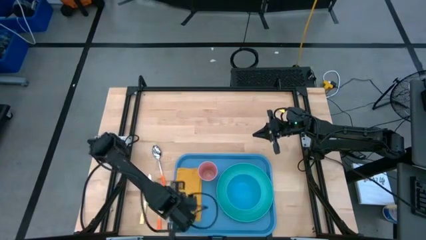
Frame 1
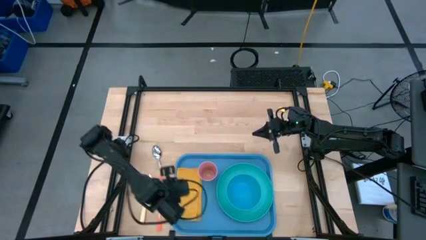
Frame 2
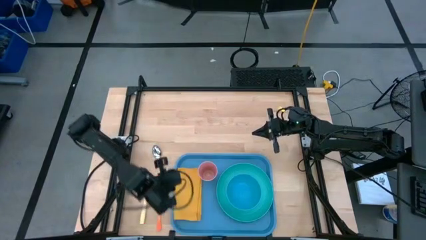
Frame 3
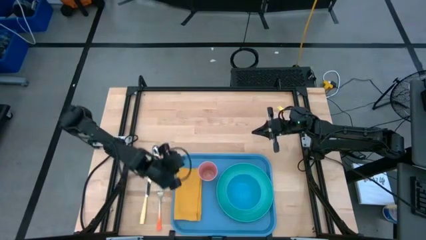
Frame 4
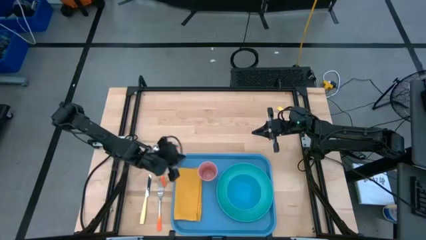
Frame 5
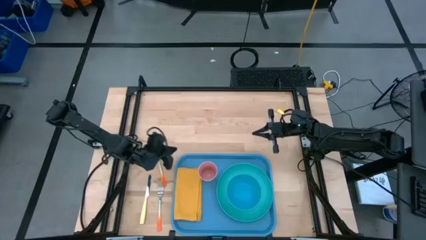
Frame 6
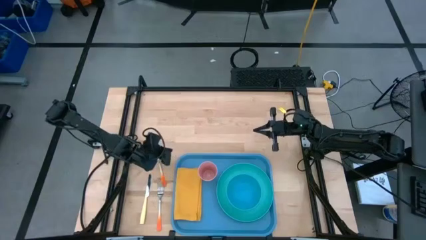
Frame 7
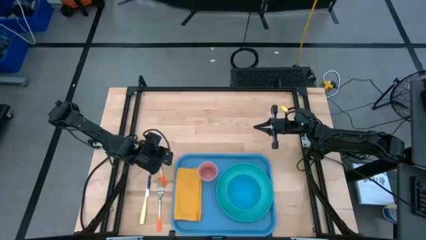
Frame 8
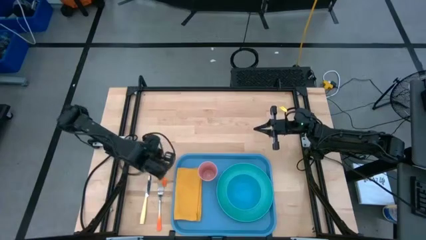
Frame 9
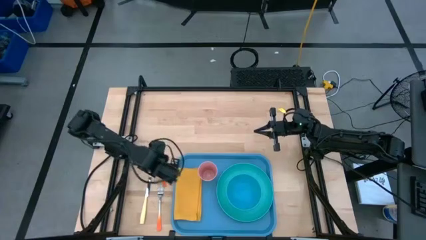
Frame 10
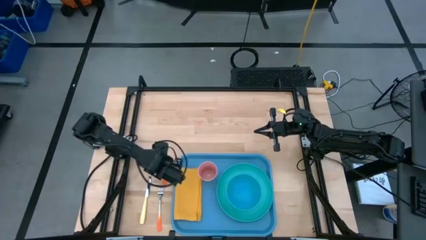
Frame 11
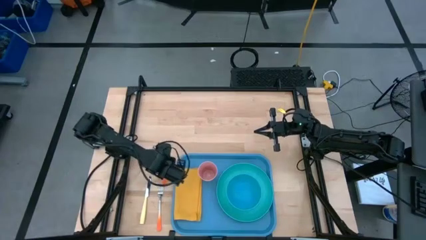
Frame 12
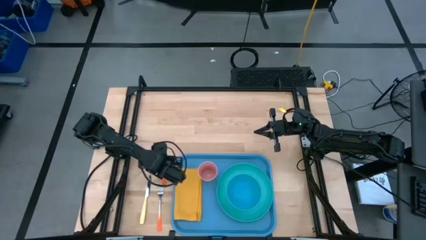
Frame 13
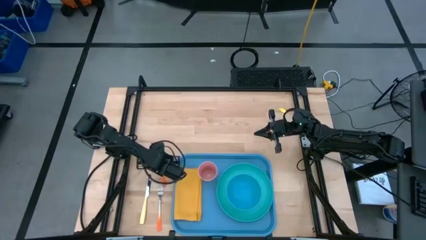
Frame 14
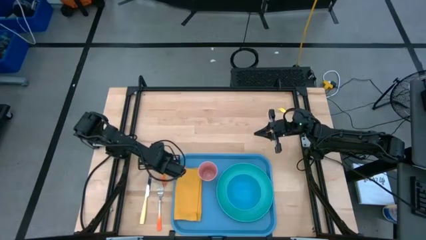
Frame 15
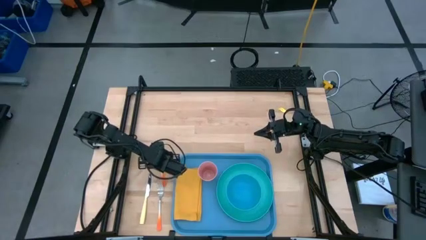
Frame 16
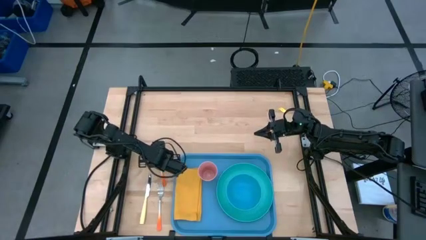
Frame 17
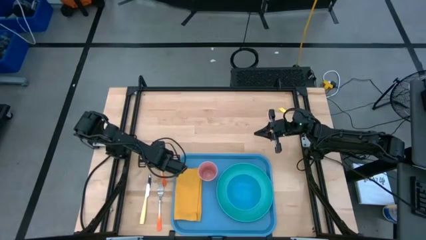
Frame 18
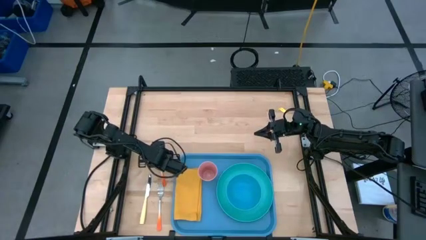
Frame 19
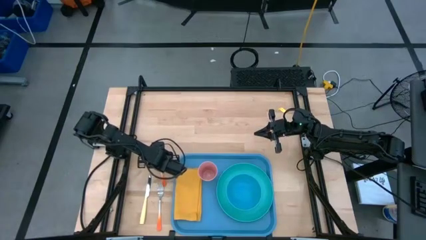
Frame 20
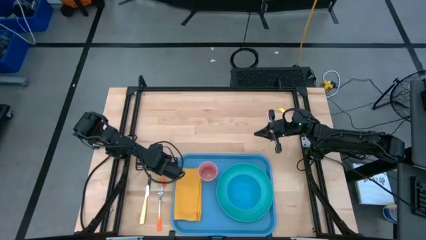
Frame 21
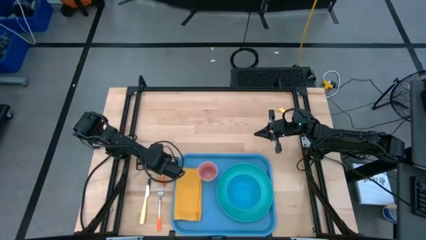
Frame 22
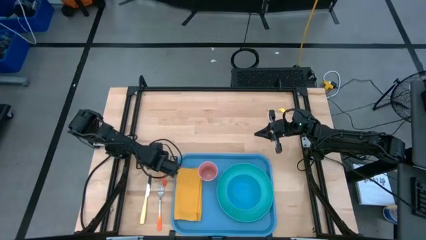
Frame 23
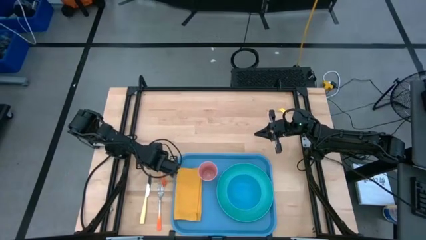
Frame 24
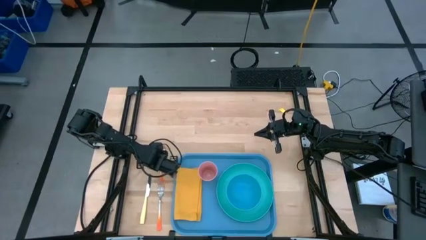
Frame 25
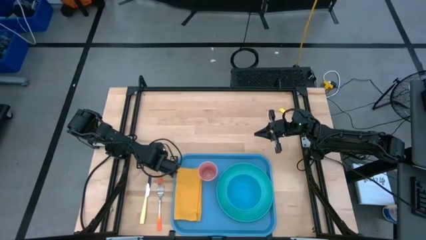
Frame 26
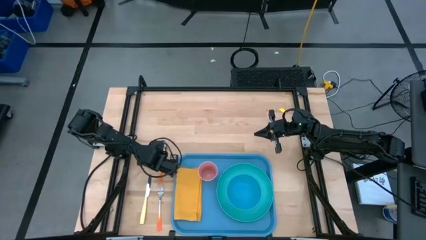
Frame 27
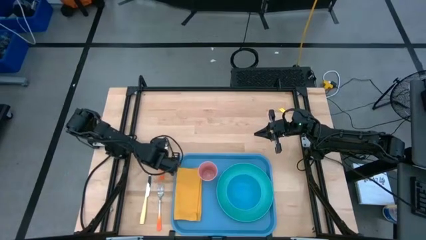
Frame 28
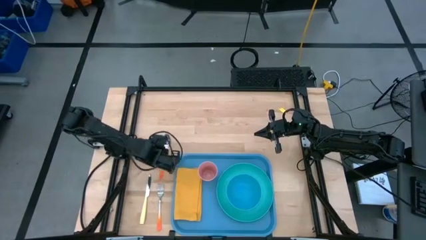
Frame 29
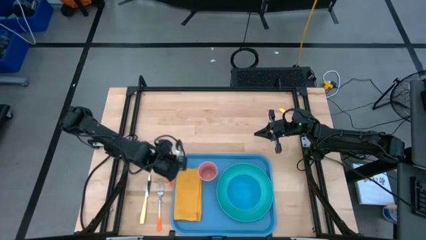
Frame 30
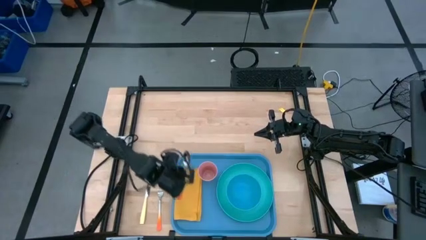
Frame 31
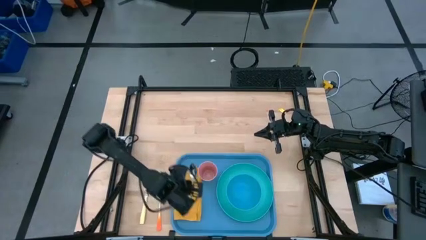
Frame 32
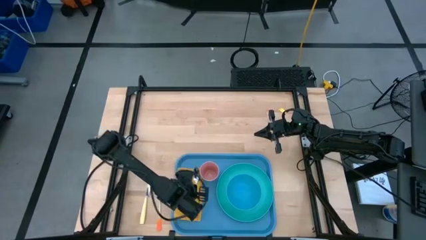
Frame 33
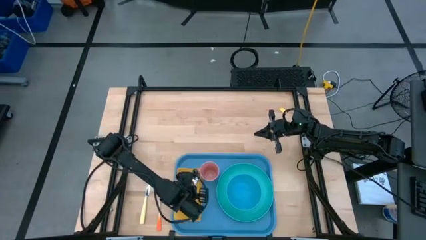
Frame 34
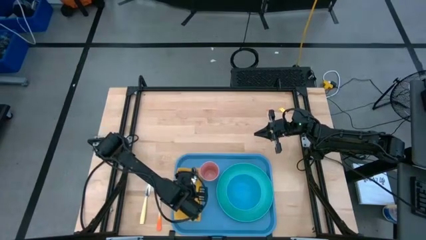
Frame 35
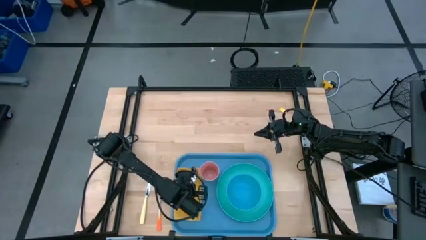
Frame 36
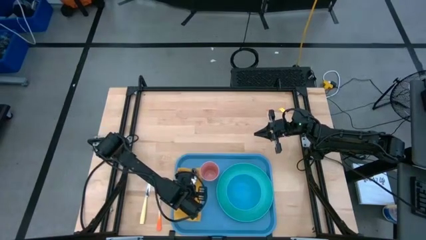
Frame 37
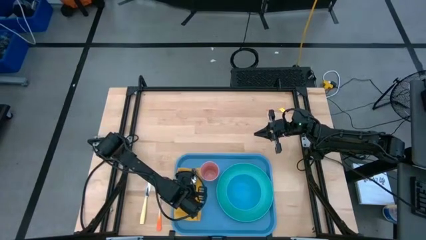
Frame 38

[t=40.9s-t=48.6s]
Task: Set up tray
Put the orange spoon on the top of the yellow napkin

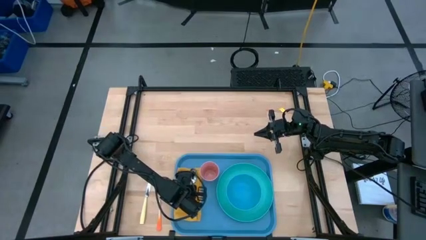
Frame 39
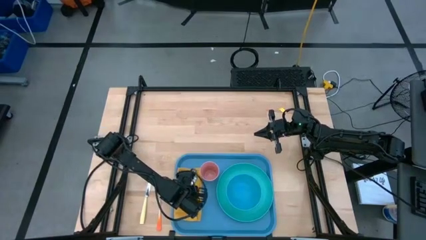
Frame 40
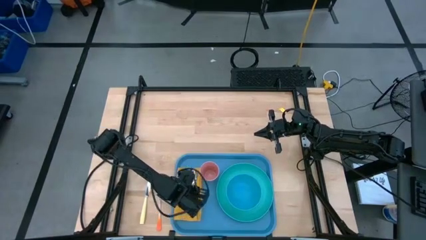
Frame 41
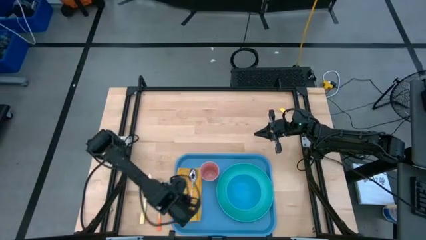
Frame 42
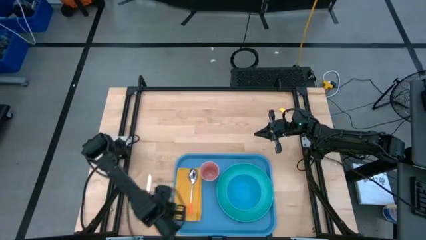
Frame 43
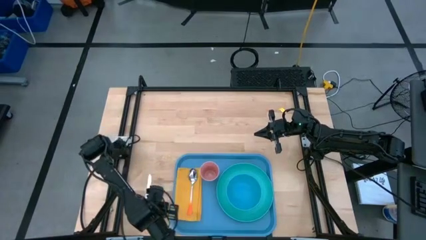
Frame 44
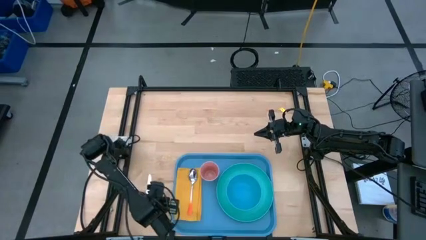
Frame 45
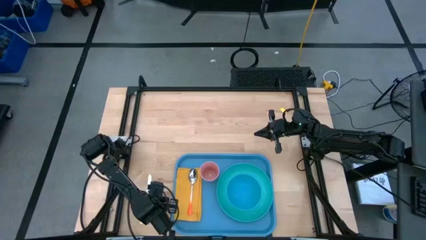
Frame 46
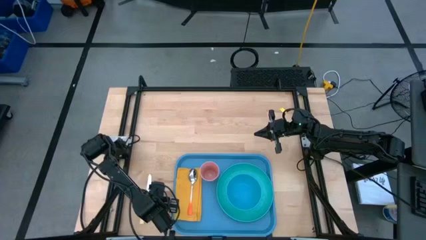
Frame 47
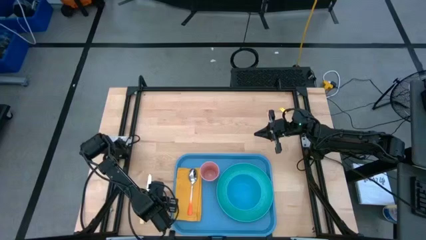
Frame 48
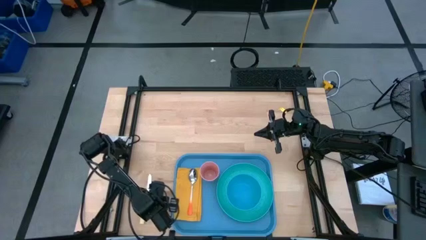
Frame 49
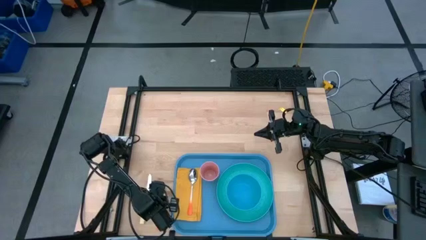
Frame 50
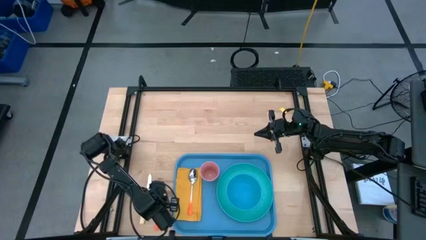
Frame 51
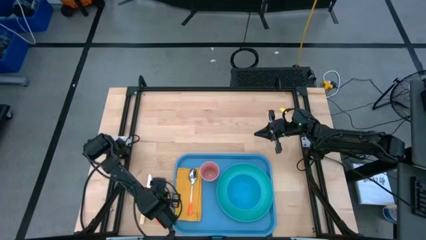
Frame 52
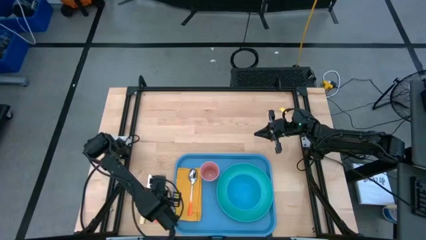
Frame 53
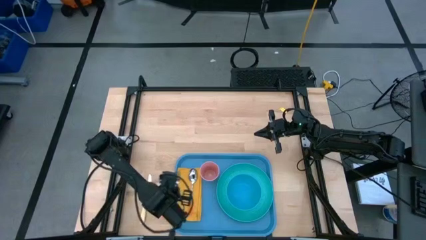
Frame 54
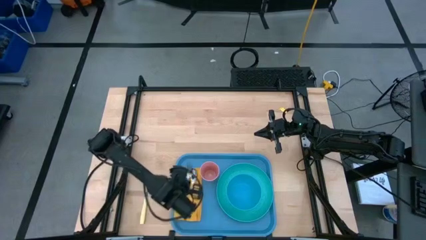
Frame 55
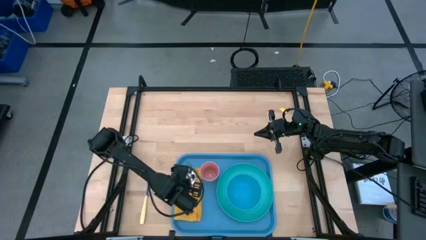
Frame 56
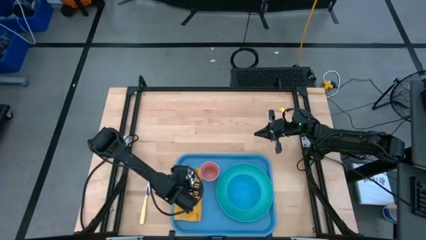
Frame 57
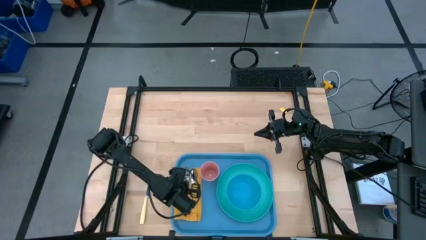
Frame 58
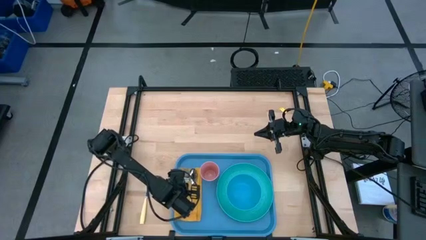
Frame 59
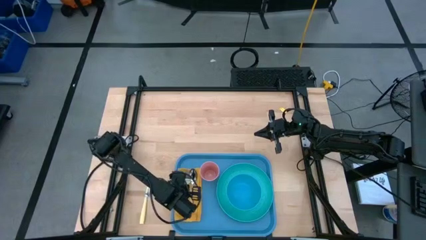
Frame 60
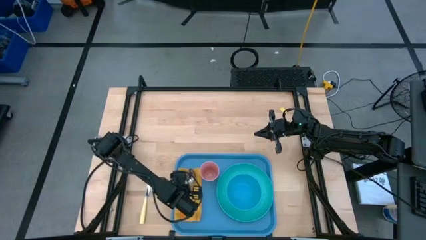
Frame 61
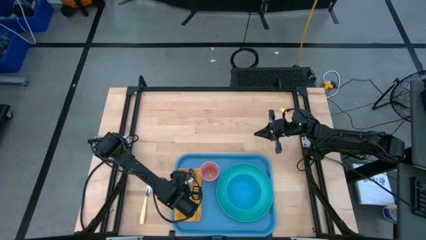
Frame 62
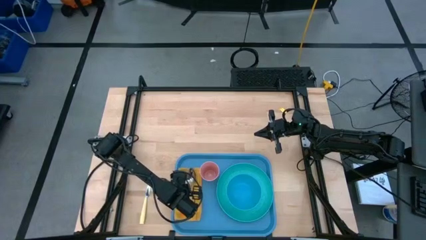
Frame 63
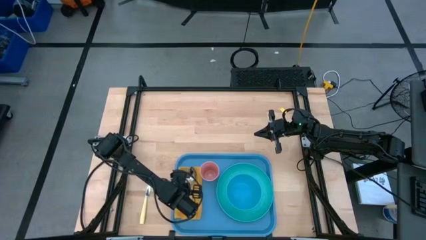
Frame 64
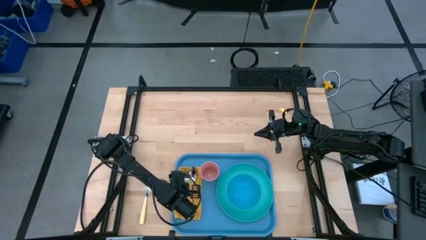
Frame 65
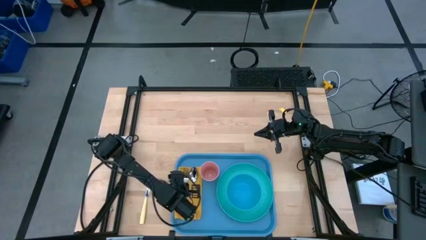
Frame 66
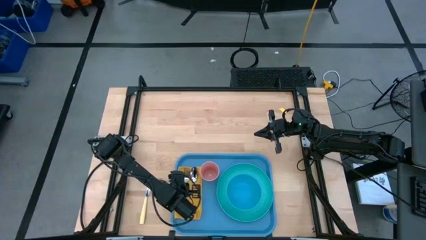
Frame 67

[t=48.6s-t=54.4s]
Put the orange fork on the top of the yellow napkin to the left of the orange spoon

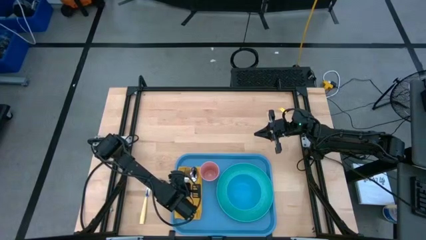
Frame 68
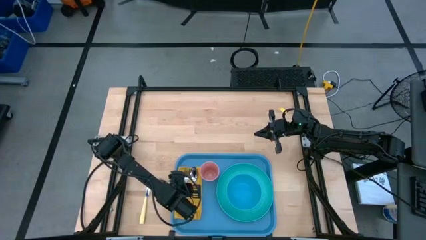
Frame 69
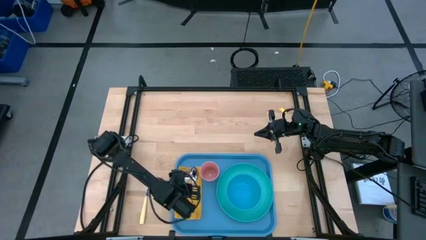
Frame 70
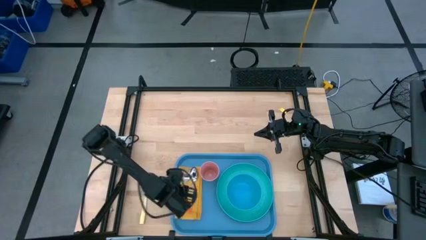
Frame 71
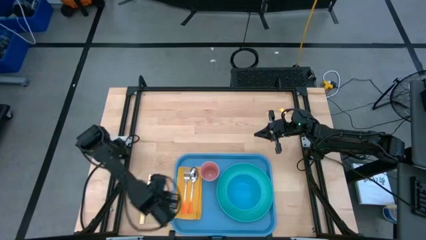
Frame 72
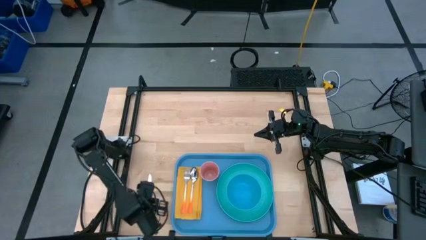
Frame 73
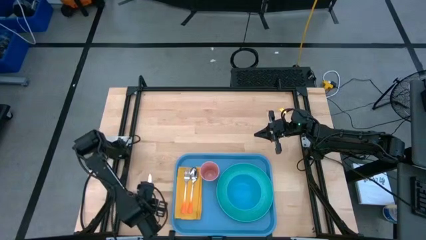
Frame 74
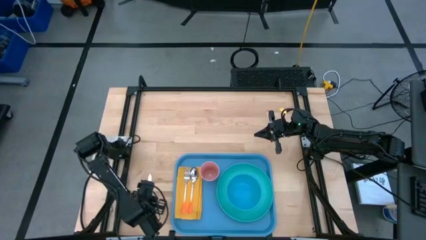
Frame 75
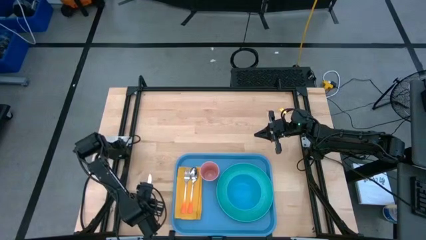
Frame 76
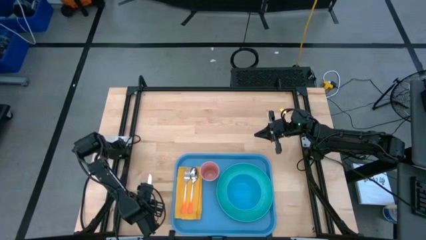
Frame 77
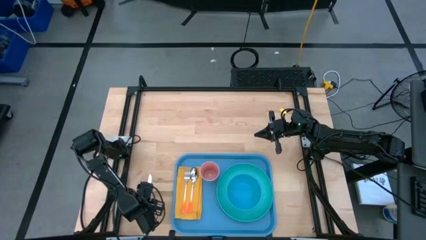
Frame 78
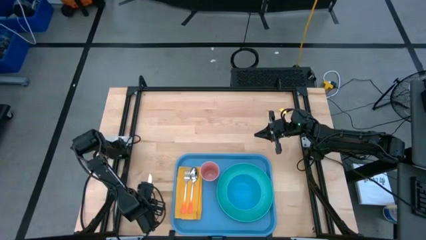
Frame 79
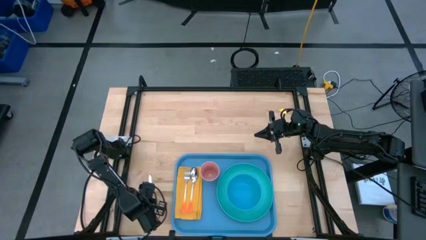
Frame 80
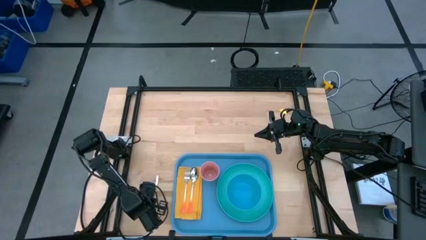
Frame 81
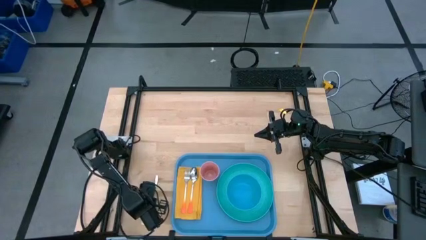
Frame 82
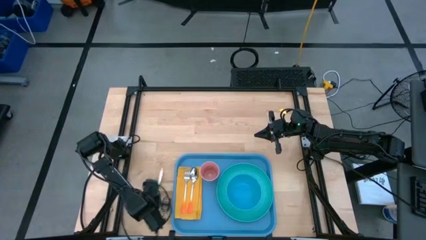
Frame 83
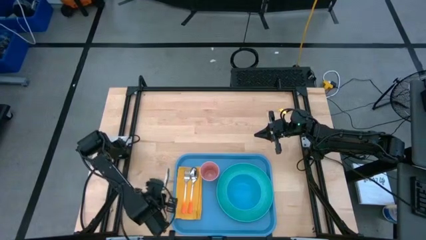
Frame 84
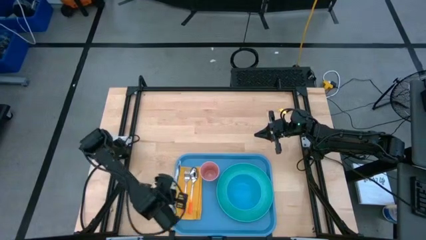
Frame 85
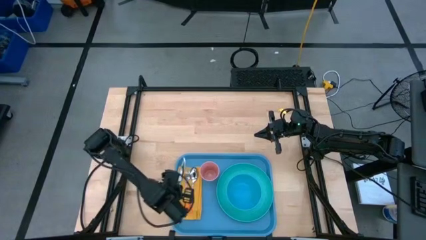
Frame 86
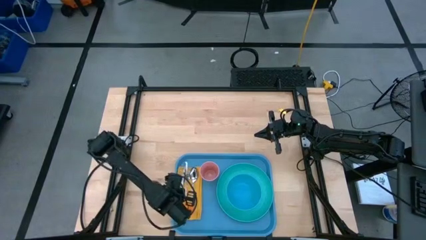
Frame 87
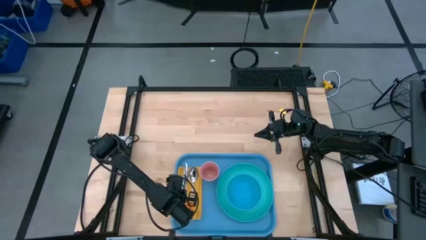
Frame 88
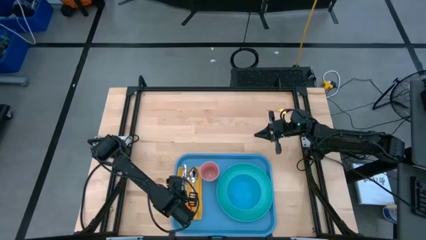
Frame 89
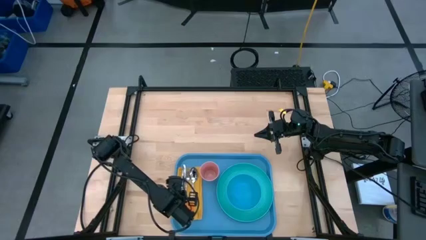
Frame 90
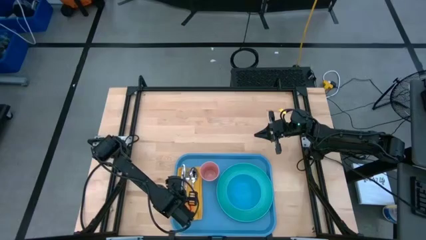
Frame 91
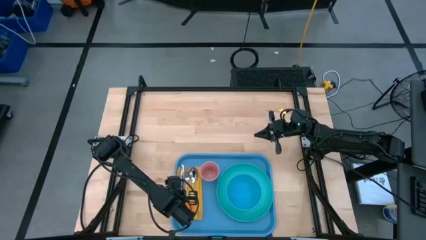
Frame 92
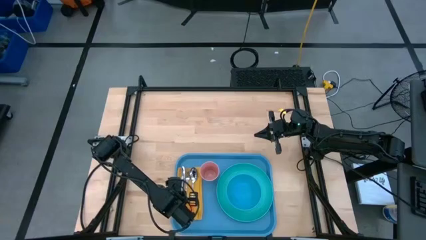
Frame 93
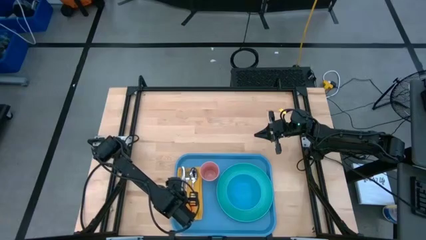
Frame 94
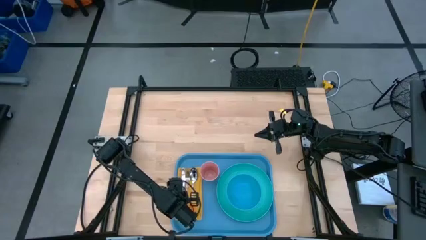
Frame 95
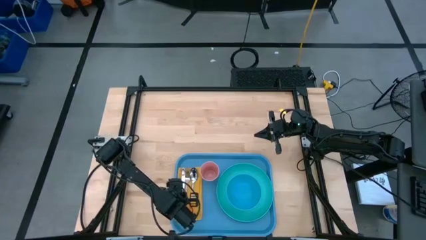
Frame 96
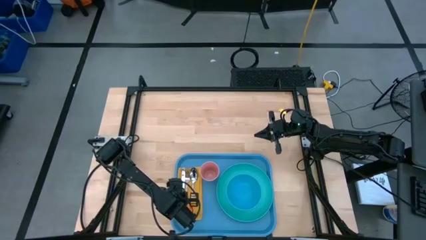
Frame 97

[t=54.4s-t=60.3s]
Put the brown knife on the top of the yellow napkin to the left of the orange fork
